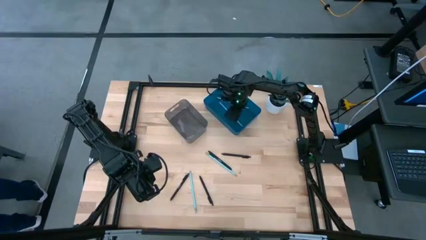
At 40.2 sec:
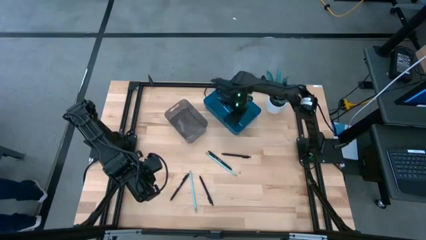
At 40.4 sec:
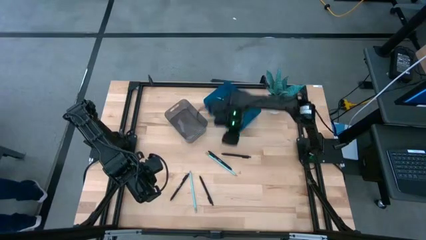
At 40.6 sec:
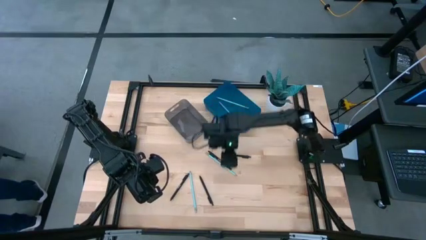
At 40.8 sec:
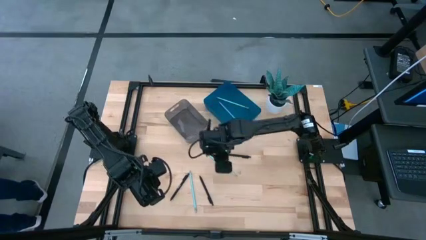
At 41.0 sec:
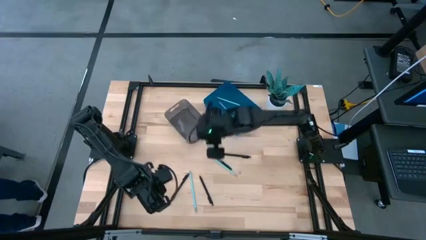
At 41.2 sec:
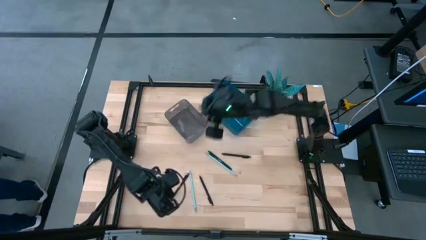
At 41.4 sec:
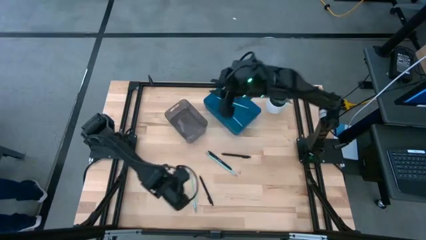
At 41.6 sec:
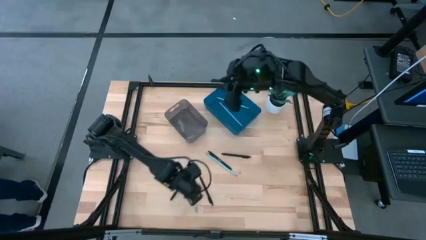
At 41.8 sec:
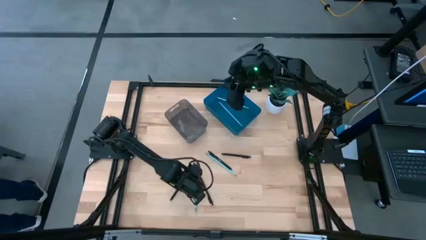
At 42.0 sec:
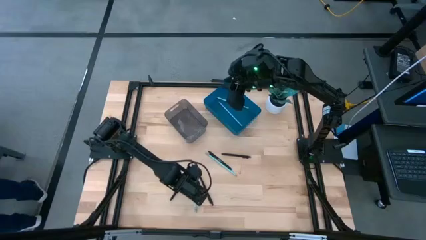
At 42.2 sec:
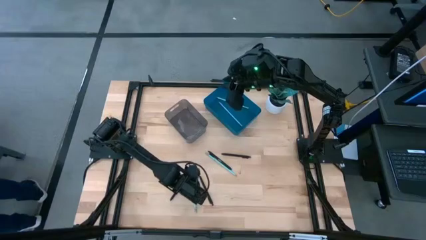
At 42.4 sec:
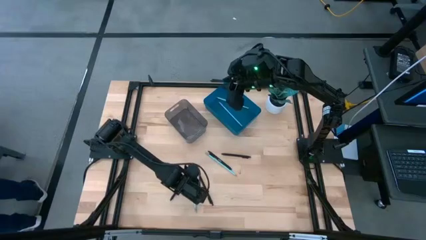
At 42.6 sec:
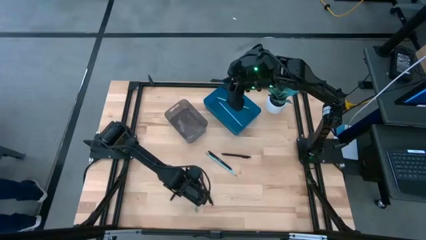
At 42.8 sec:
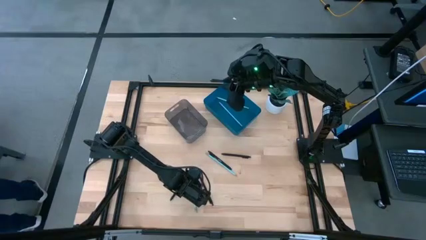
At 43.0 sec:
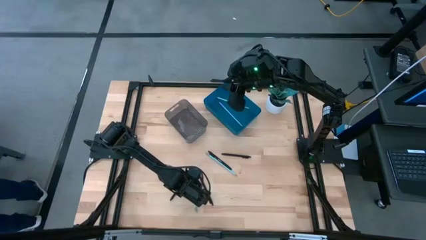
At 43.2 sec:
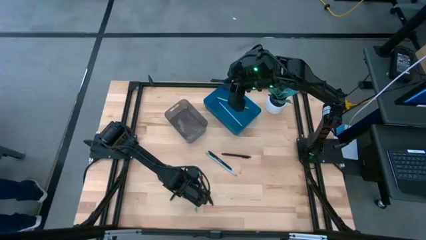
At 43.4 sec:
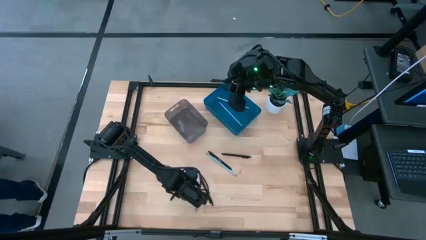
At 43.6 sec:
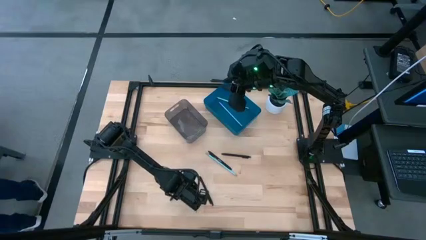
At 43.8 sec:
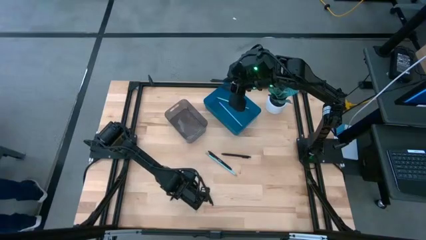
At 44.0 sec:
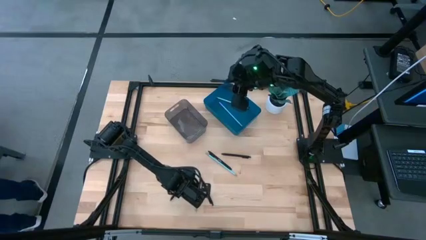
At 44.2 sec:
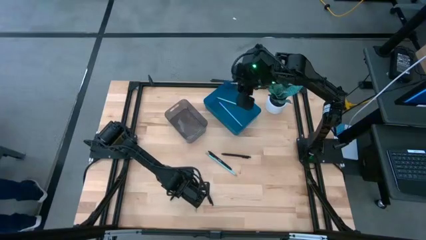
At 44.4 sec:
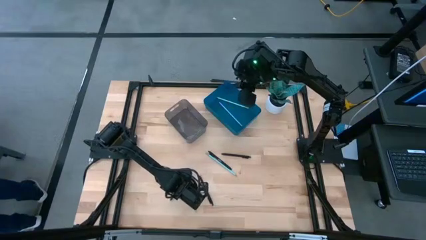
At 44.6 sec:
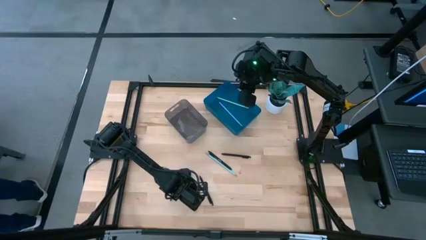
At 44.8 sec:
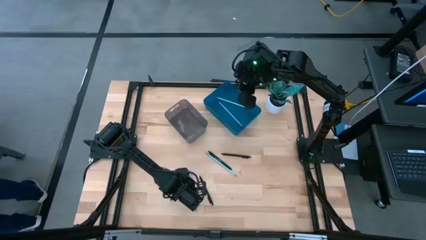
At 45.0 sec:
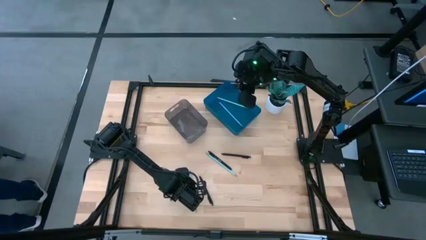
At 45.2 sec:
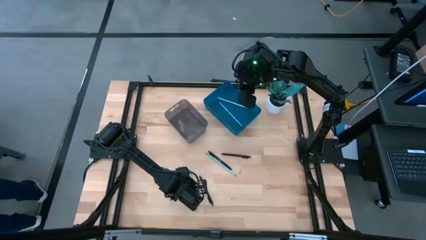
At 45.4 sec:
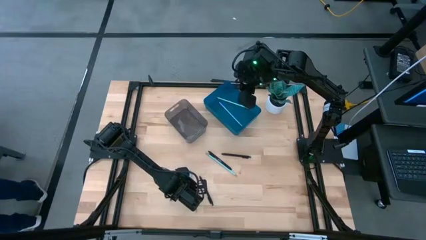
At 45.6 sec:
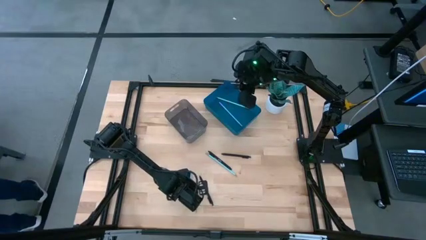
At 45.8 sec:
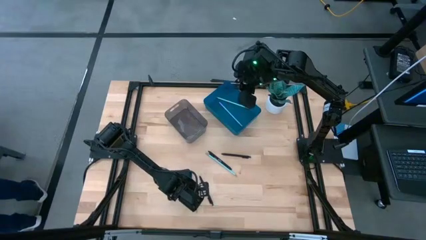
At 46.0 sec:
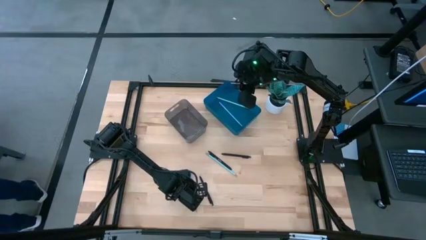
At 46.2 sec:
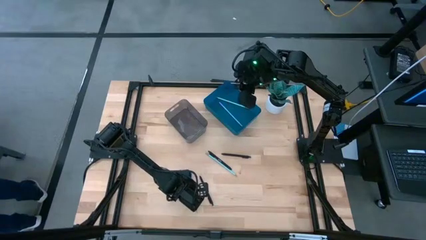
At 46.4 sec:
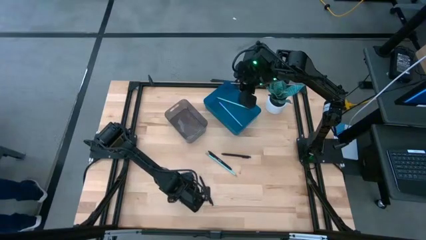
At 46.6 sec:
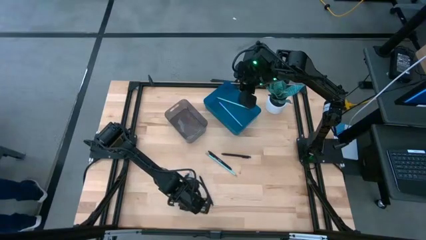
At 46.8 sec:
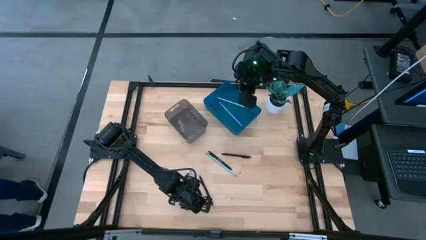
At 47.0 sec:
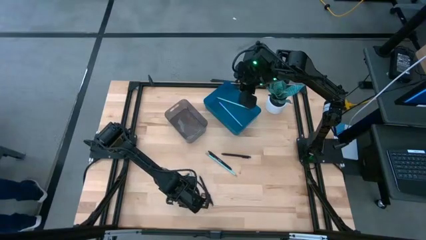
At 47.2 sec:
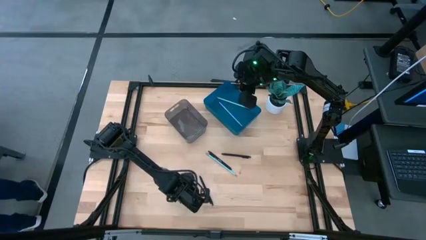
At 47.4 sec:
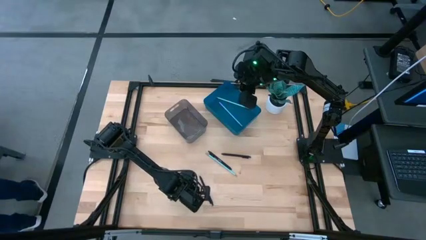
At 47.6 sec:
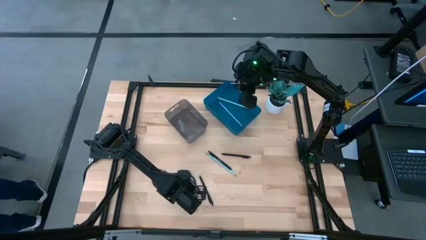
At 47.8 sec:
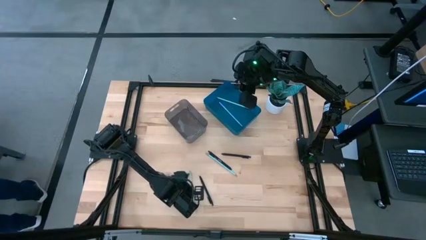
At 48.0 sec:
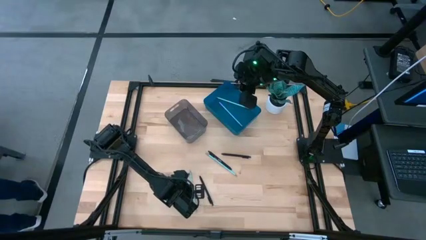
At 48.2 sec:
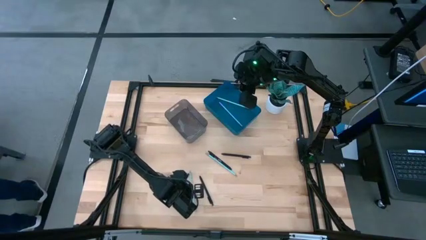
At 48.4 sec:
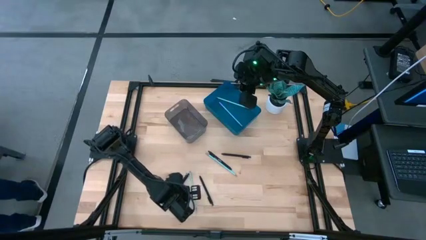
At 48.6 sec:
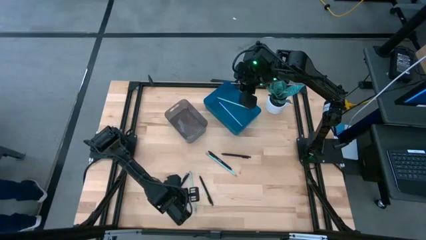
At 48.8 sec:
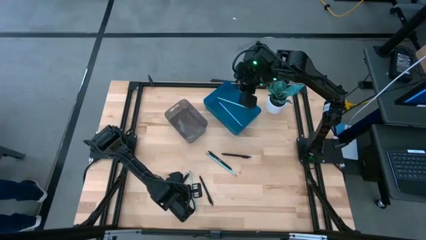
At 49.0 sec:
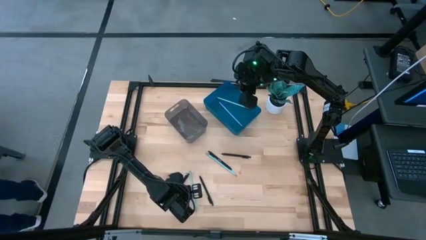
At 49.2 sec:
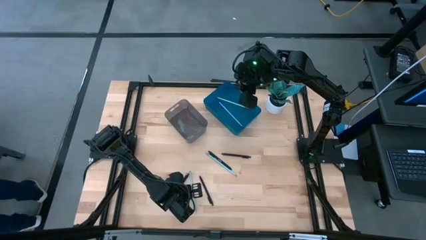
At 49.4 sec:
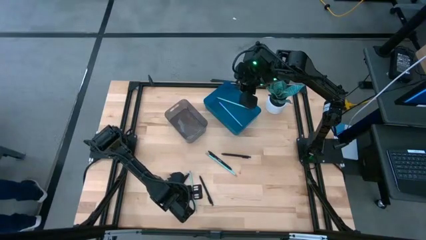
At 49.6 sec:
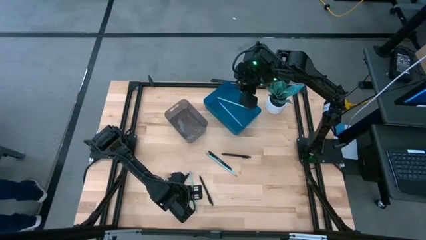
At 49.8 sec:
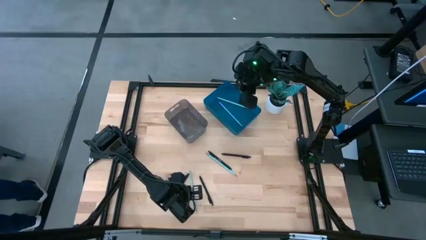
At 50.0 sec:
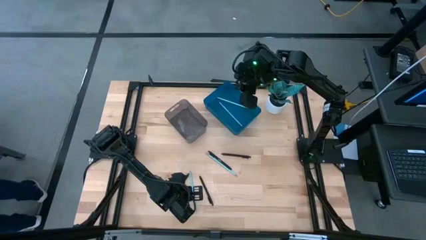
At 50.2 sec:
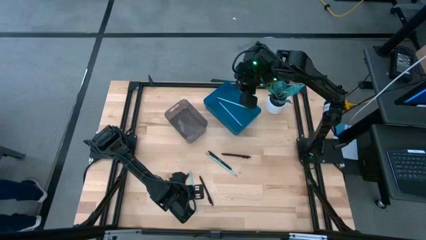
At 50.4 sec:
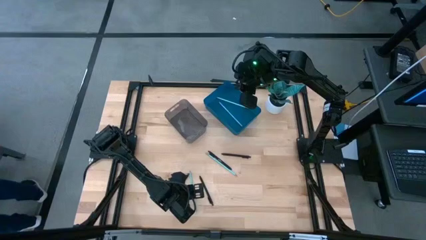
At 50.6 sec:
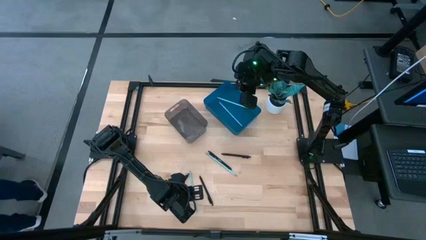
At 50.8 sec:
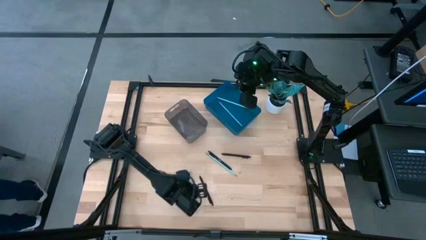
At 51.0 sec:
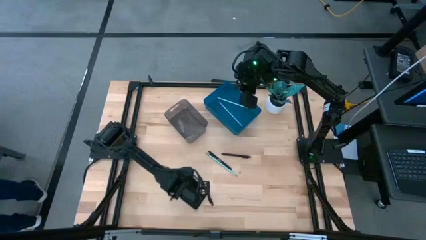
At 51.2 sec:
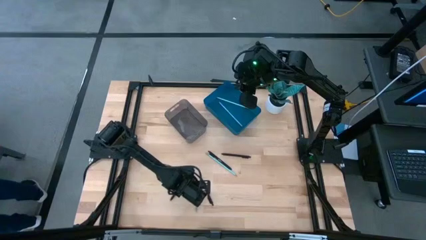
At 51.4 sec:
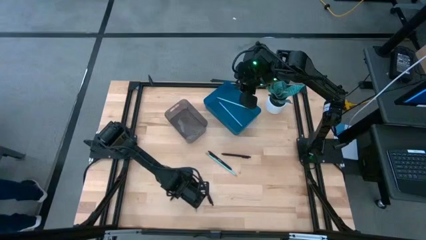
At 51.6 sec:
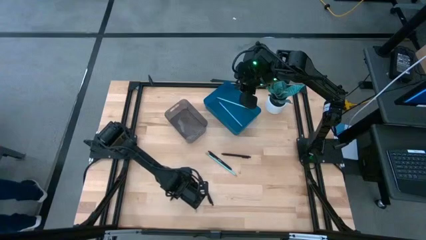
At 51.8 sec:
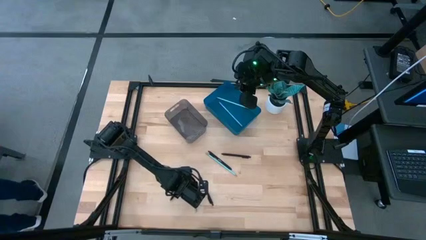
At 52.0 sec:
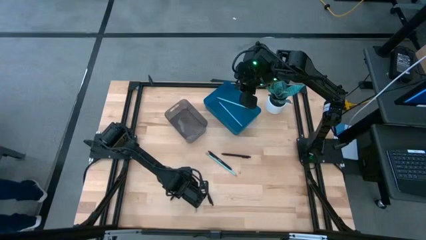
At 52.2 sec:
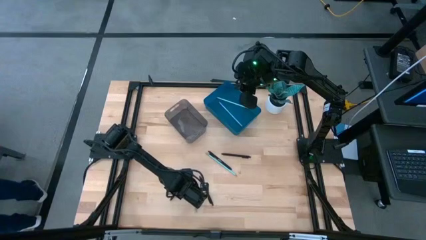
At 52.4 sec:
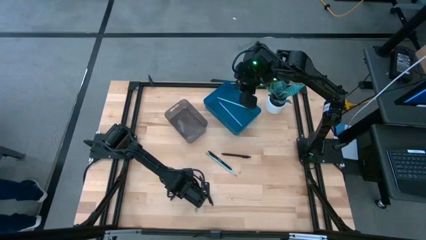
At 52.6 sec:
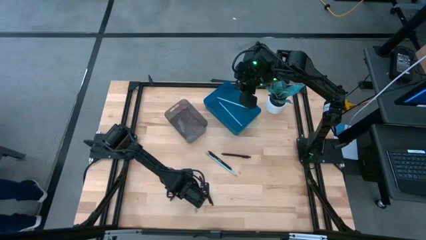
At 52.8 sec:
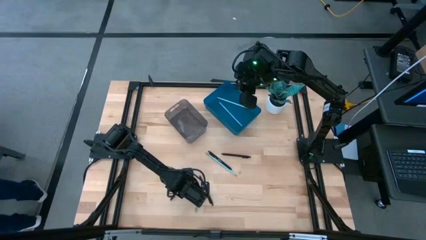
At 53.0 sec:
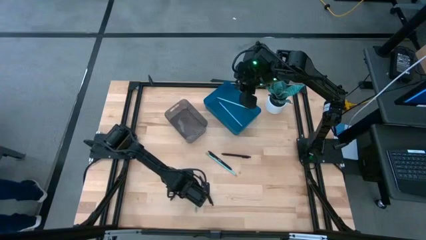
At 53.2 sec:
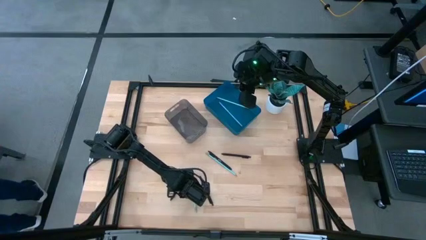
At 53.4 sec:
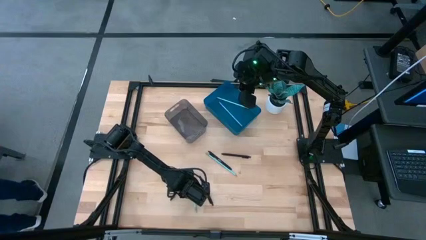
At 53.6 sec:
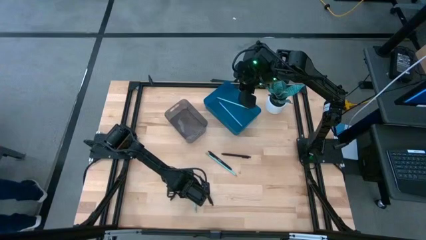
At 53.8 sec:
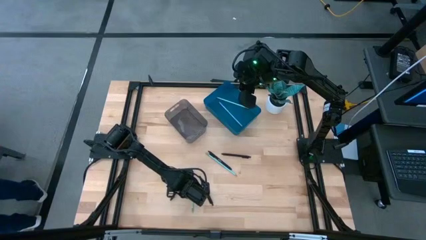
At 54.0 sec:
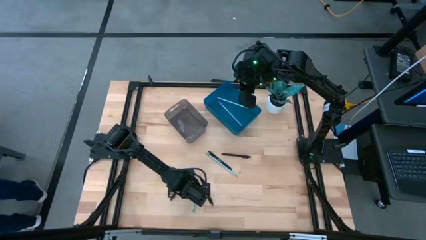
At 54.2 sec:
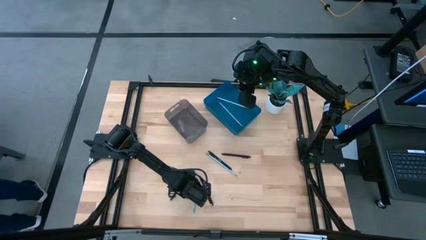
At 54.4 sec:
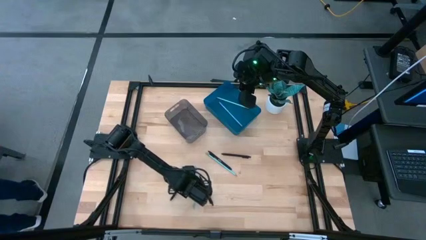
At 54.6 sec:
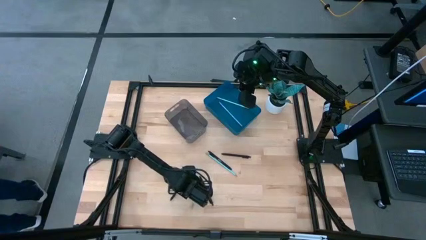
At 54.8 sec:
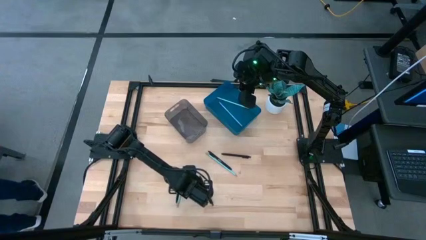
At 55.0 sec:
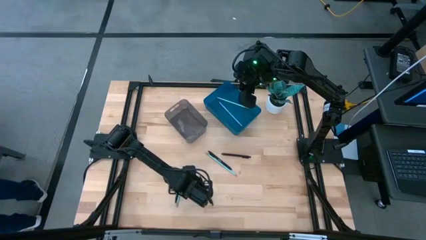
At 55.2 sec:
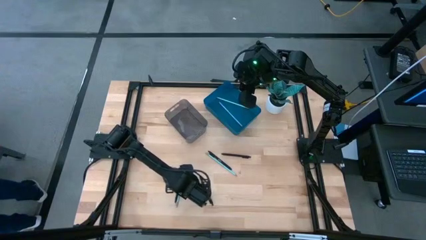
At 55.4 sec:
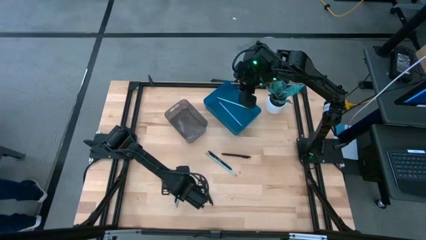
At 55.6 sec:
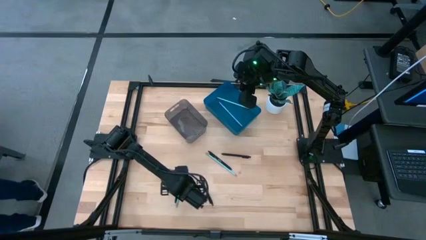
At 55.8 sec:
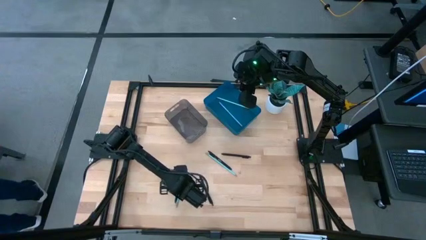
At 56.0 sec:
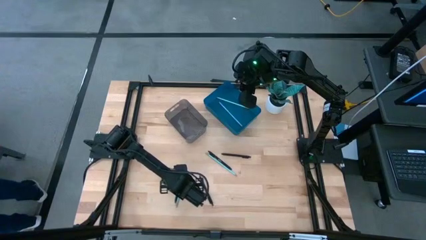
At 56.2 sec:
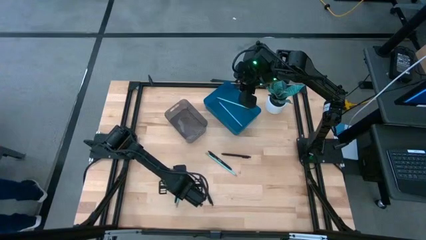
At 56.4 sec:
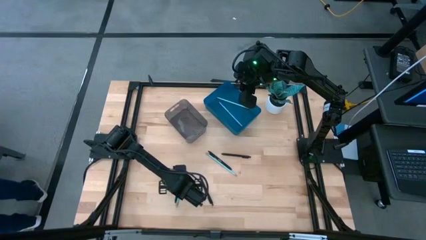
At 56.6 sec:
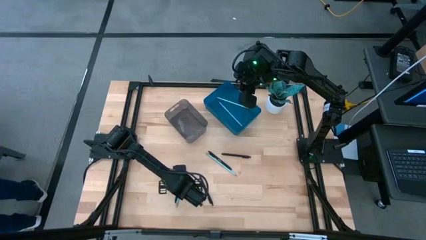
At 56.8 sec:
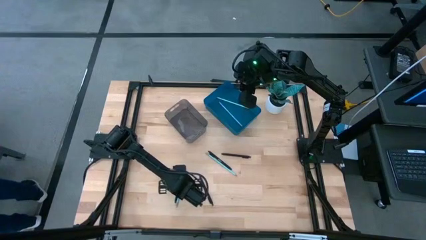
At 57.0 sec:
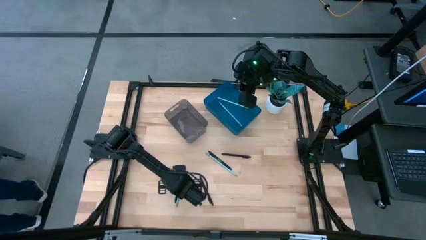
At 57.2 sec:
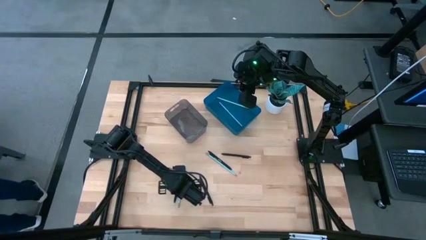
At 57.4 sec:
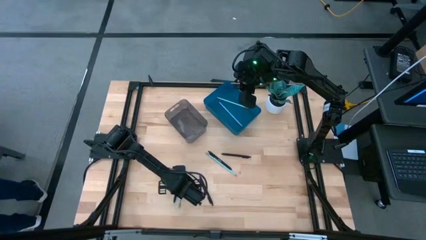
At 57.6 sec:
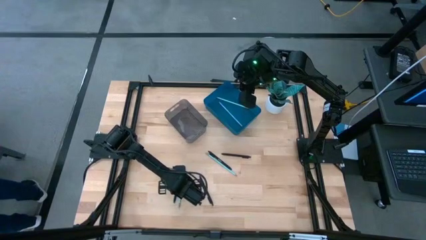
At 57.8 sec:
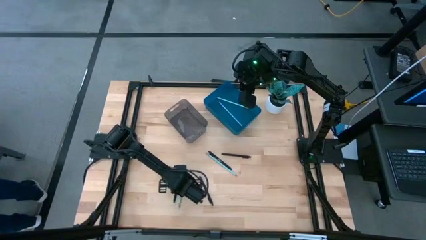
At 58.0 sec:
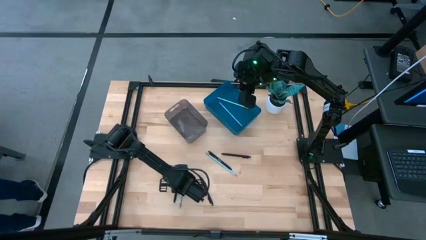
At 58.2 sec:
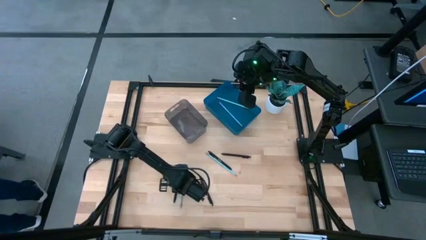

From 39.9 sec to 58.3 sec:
Task: Sort pens & pencils
Put the light blue pencil into the blue bin
